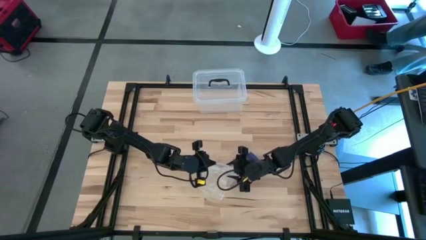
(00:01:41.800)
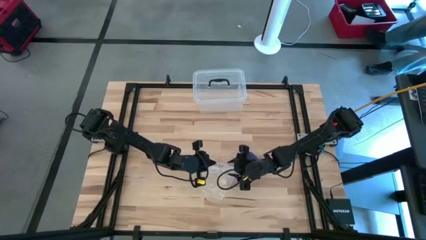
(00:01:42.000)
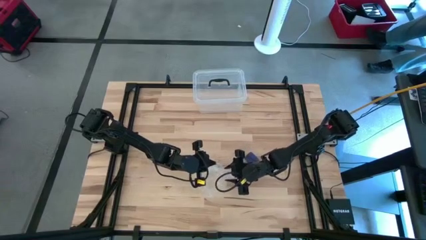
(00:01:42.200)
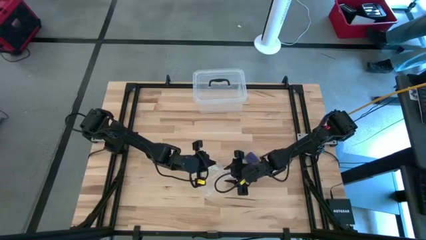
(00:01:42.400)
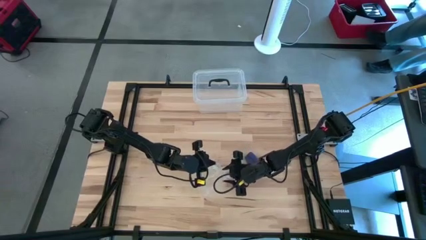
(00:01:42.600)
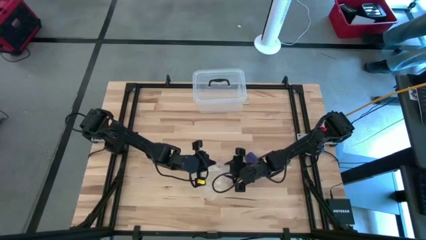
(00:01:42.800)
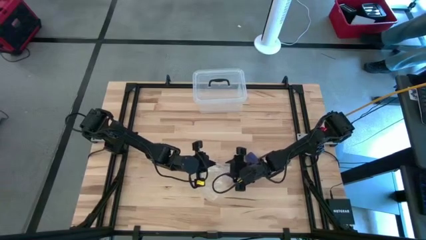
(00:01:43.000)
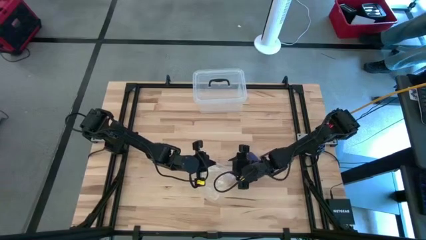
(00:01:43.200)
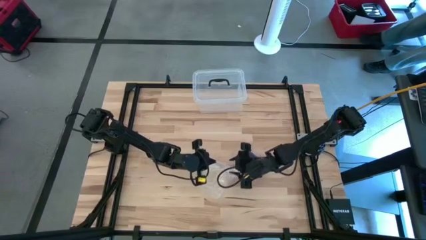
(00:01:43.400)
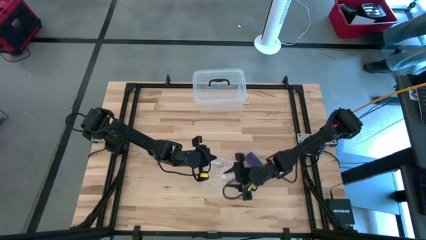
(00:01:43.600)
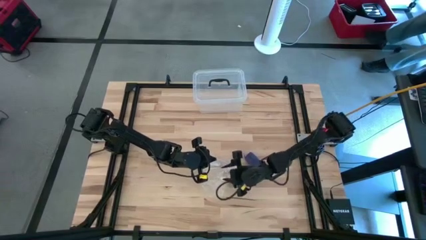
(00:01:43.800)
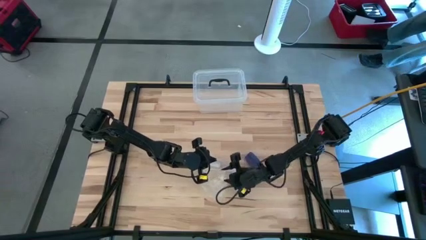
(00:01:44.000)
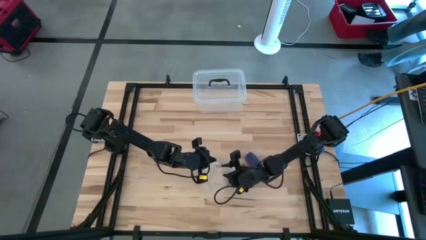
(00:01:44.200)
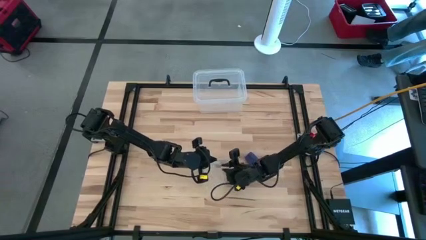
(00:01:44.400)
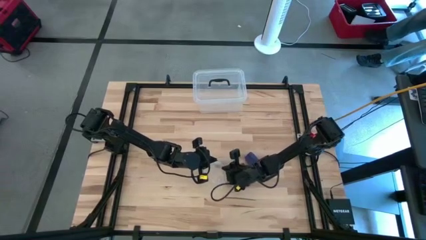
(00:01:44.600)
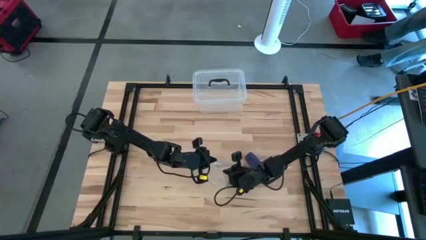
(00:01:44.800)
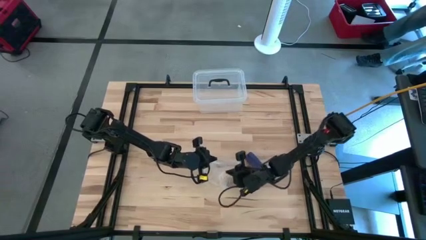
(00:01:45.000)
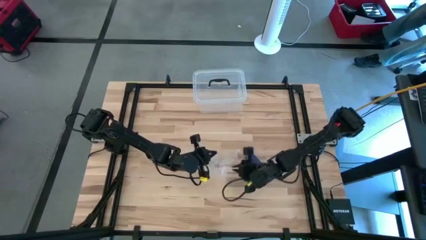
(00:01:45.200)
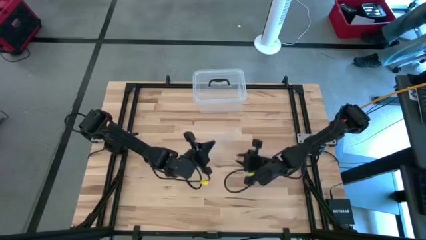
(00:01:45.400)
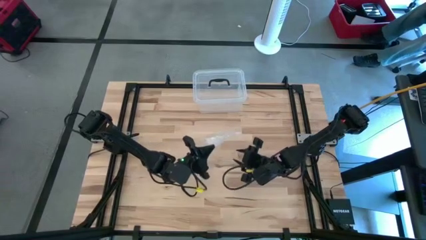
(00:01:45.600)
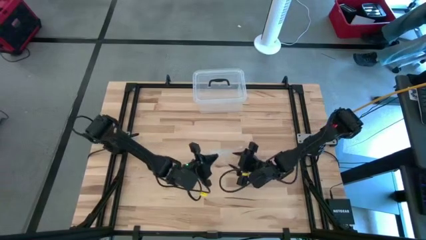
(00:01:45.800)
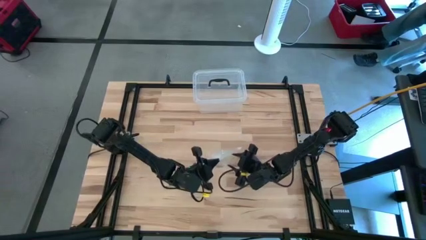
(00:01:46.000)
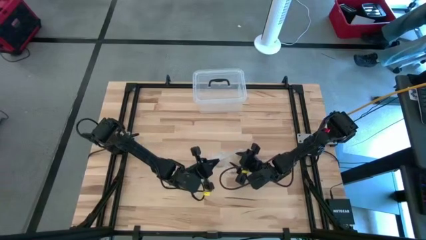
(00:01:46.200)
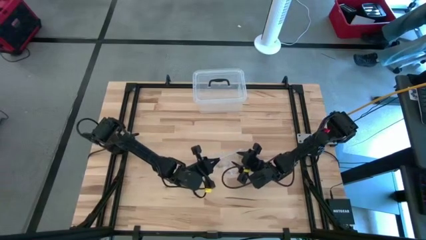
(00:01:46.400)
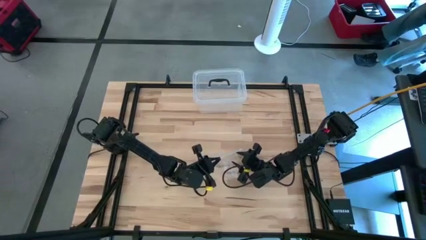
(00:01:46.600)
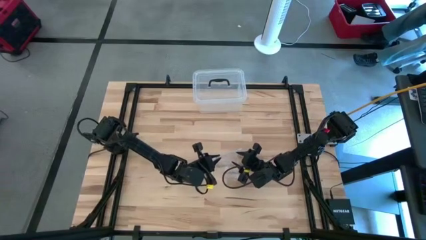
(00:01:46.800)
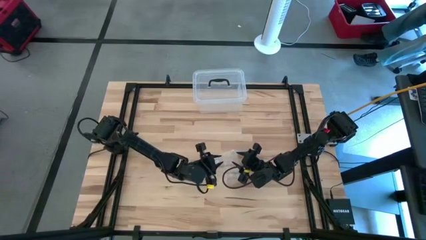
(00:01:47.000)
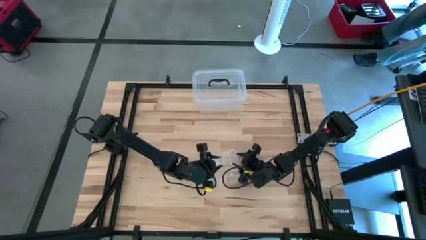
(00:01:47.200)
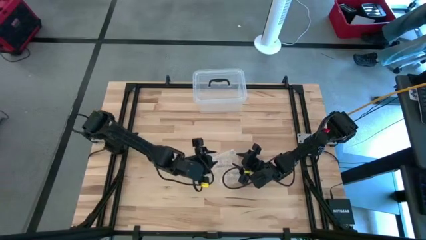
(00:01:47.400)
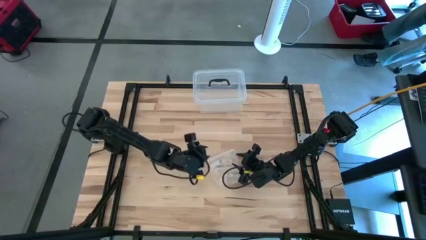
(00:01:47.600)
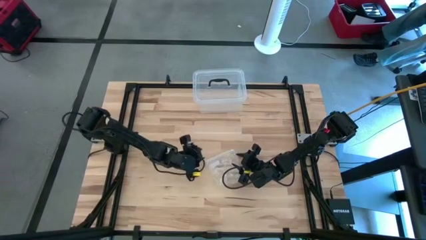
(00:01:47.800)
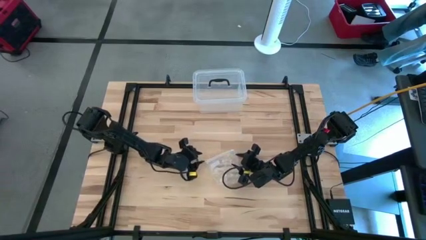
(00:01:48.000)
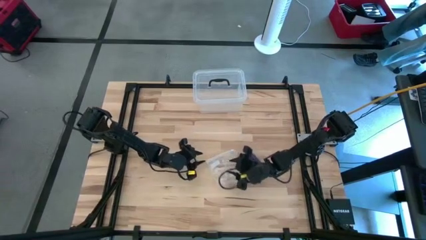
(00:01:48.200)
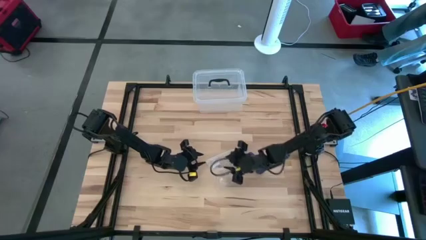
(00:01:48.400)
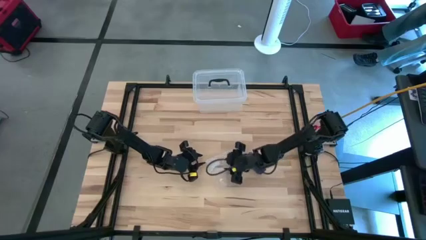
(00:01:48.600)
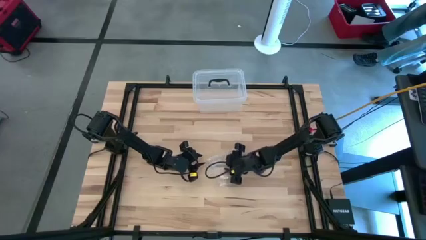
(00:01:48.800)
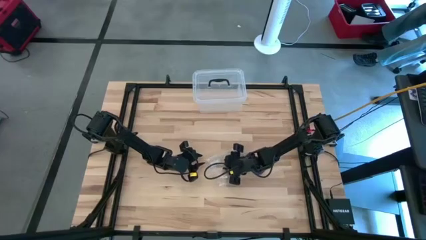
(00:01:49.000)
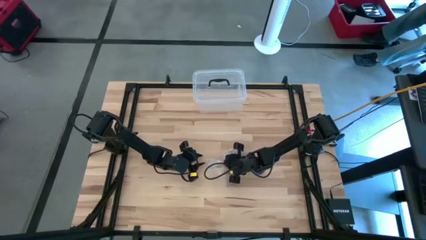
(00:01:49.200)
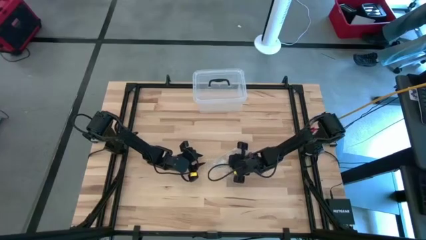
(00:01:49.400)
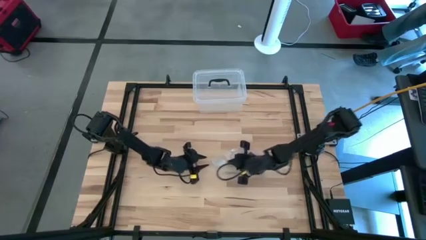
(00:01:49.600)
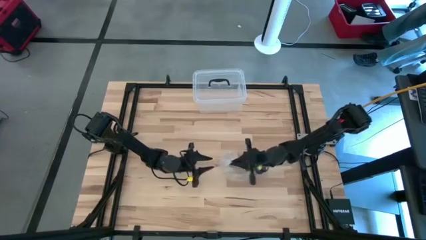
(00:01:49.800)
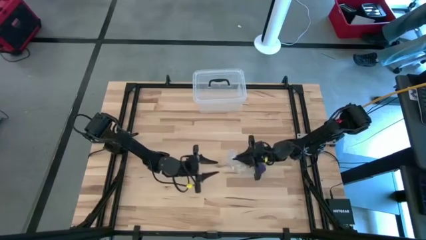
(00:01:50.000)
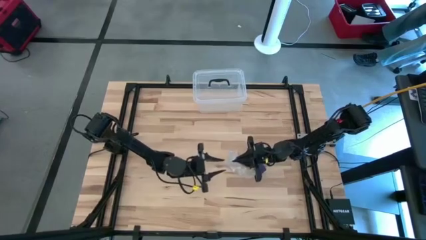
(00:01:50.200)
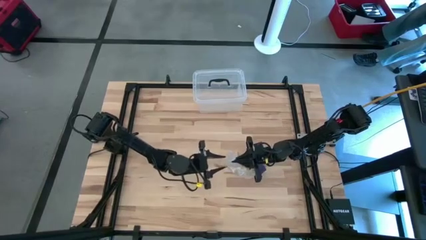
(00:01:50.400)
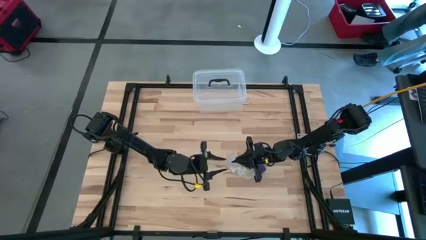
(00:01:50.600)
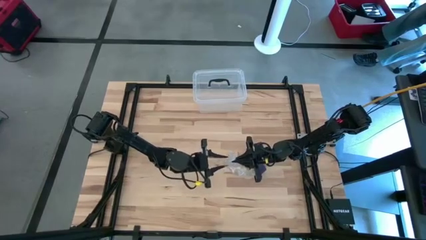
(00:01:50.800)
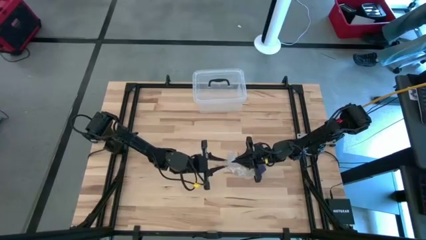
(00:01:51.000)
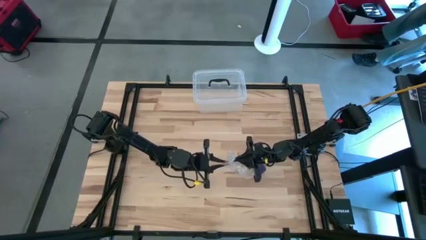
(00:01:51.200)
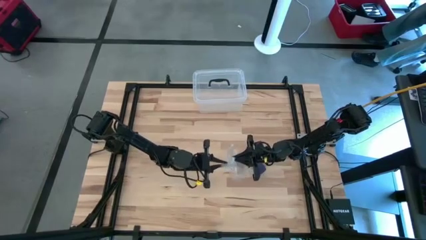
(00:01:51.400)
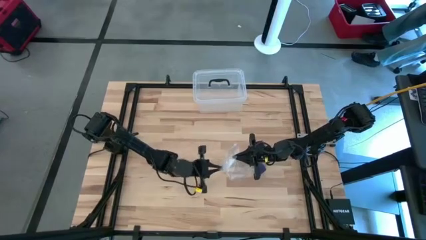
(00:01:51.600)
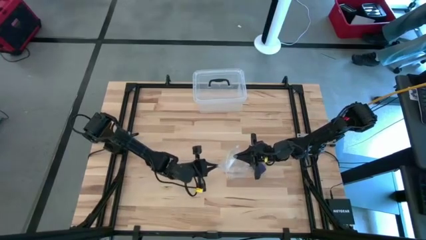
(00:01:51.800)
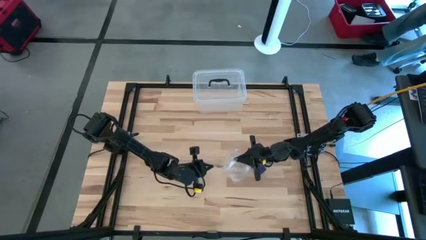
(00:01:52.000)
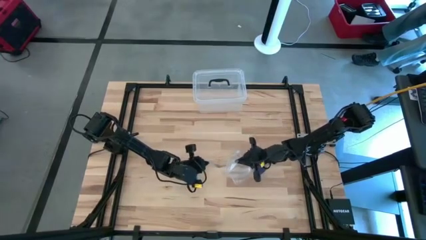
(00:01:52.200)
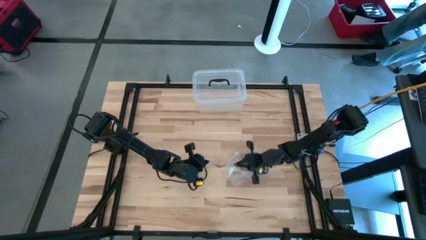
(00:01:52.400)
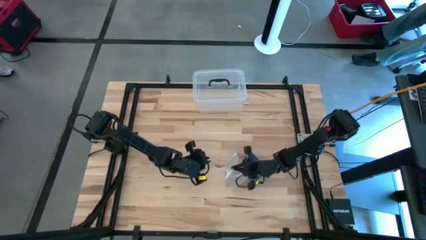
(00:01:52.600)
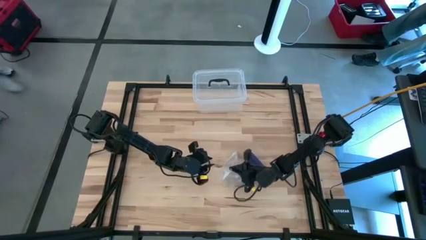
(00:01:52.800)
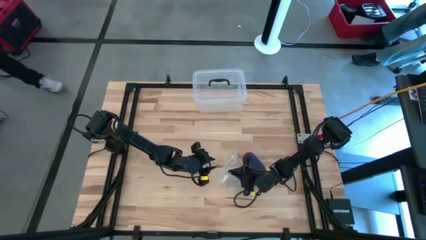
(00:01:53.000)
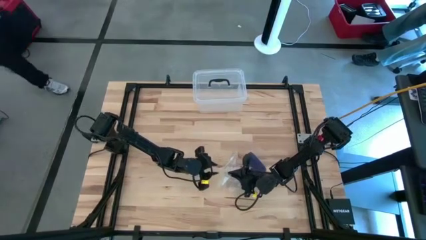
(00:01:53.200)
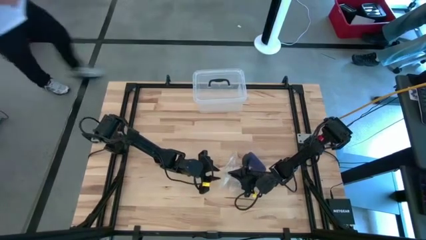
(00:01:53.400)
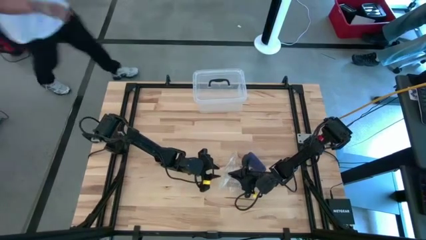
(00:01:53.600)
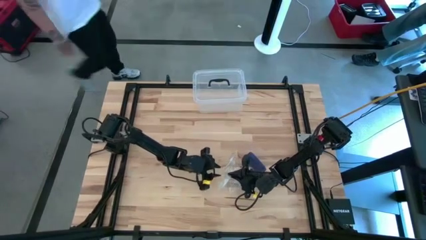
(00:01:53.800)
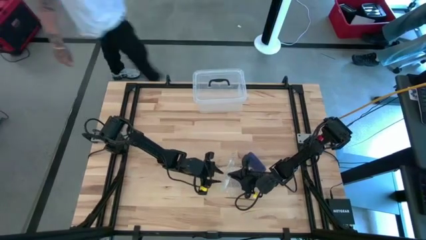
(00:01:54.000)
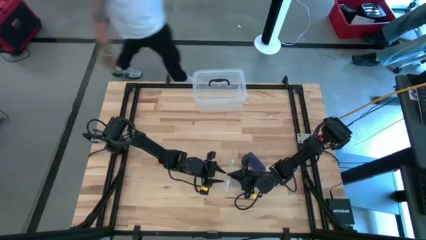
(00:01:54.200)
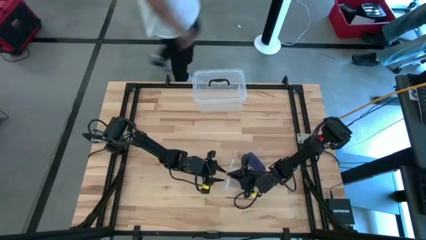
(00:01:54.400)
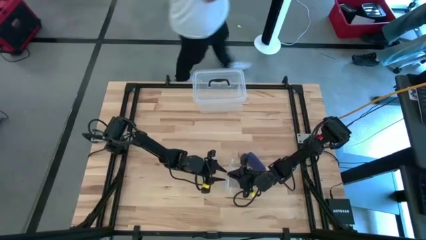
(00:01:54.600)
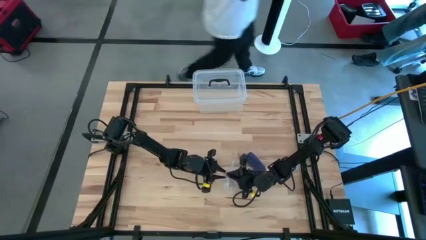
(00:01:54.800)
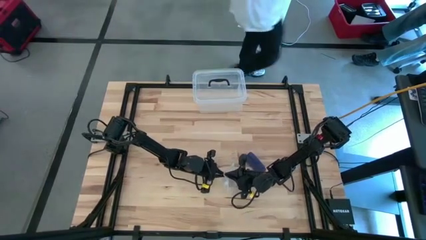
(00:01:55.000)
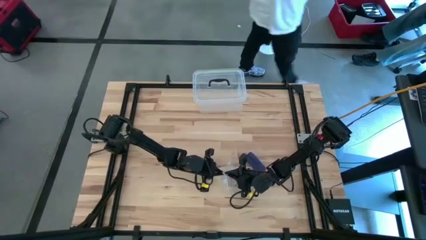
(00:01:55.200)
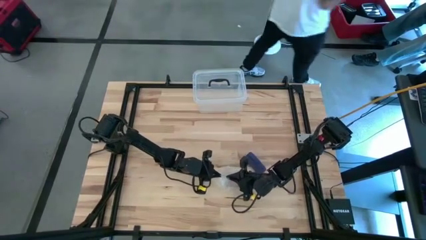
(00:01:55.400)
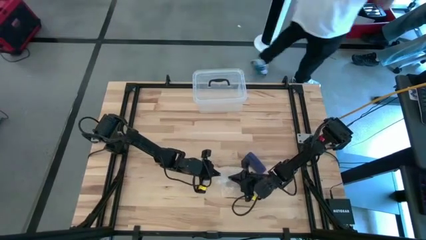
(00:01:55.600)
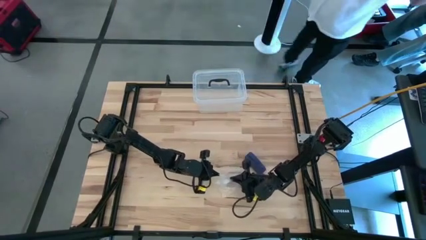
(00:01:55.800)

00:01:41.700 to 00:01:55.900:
Task: Roll bandage
Open the transparent zip bag
